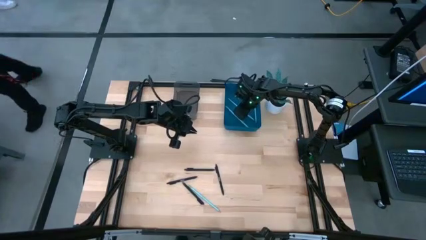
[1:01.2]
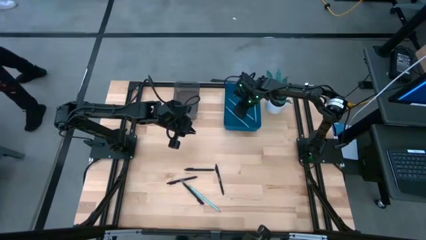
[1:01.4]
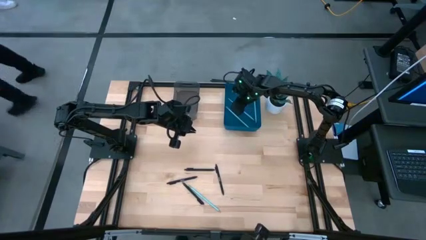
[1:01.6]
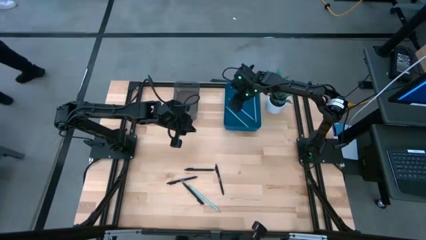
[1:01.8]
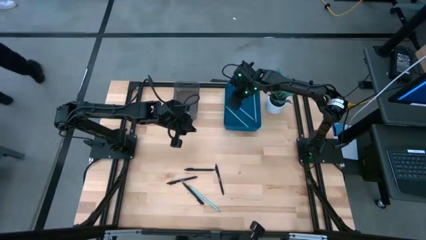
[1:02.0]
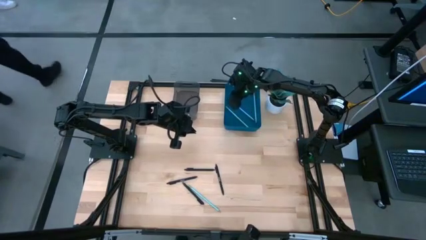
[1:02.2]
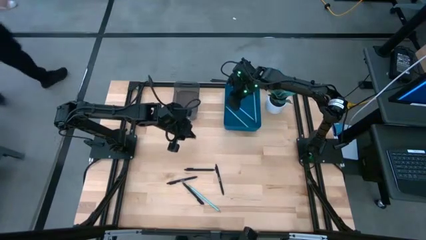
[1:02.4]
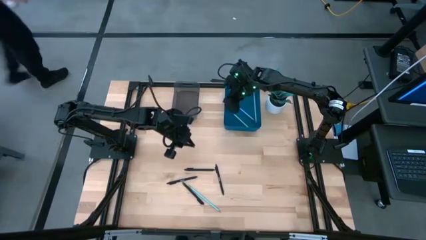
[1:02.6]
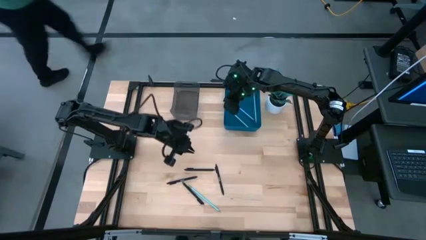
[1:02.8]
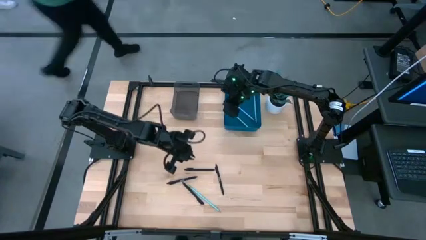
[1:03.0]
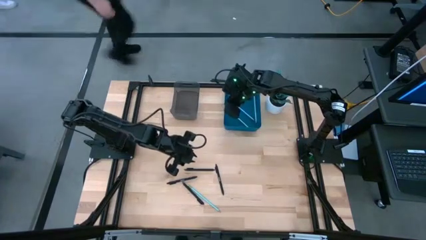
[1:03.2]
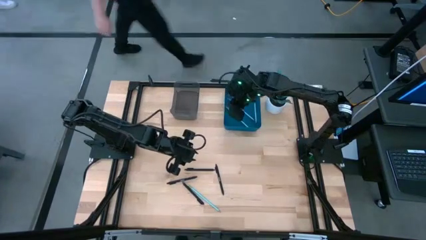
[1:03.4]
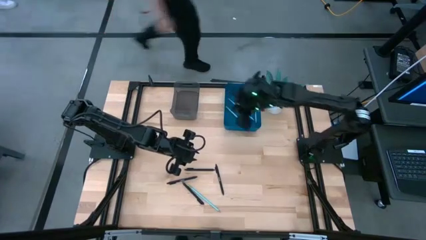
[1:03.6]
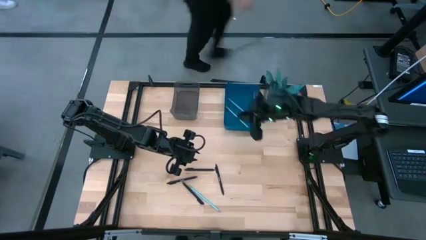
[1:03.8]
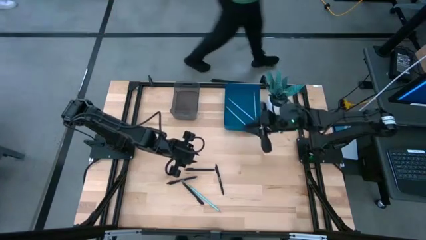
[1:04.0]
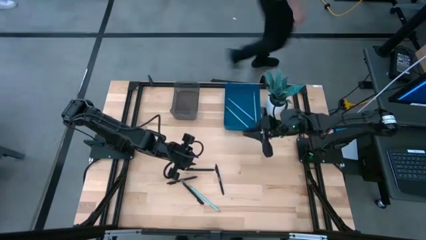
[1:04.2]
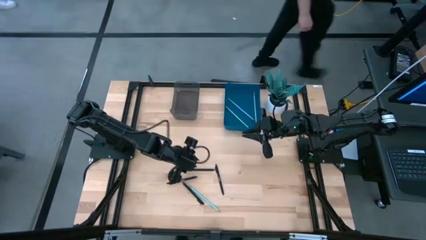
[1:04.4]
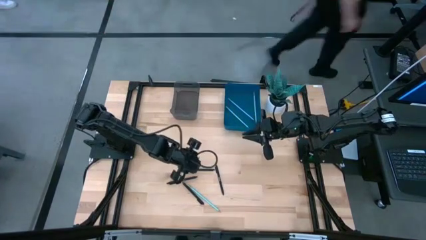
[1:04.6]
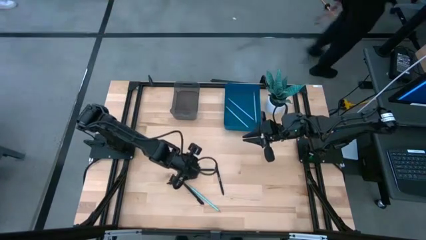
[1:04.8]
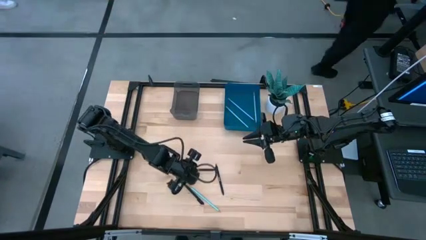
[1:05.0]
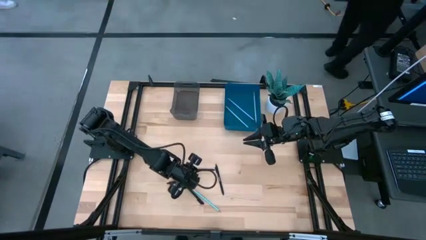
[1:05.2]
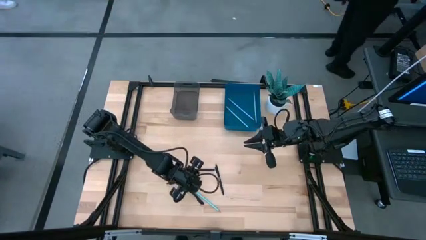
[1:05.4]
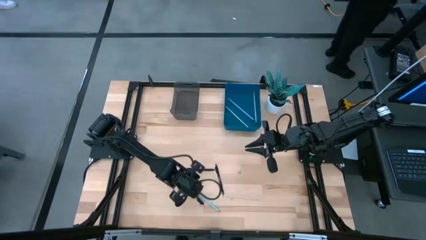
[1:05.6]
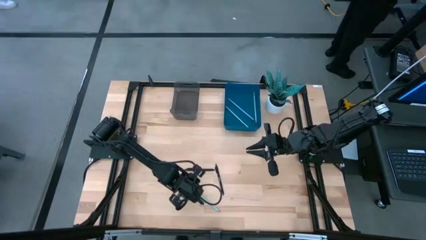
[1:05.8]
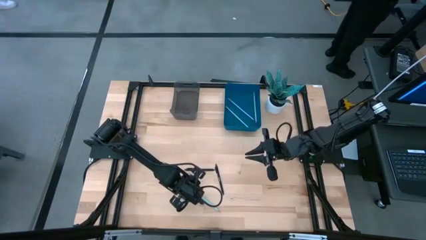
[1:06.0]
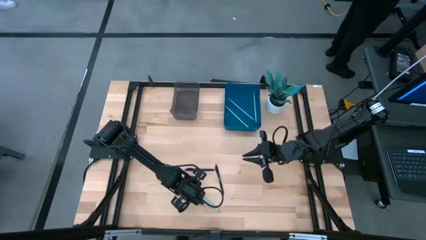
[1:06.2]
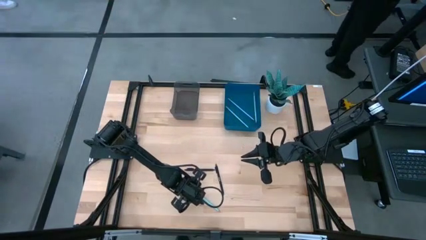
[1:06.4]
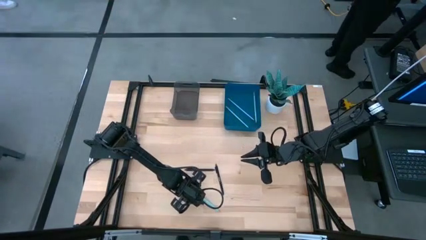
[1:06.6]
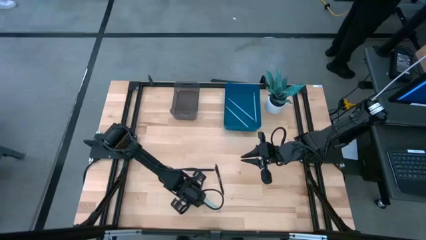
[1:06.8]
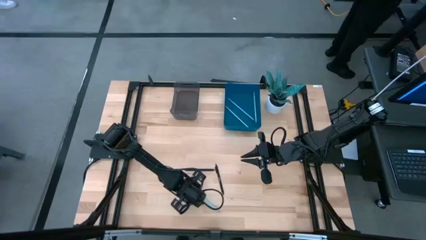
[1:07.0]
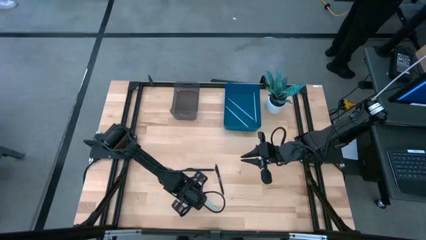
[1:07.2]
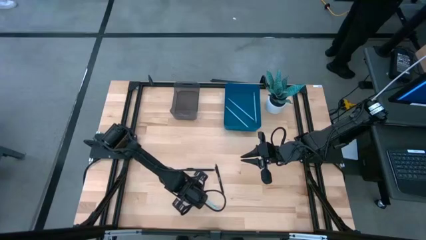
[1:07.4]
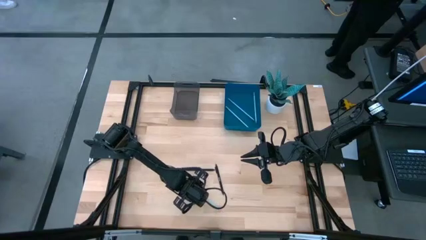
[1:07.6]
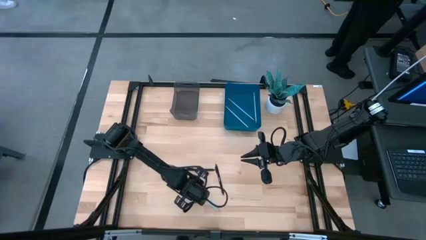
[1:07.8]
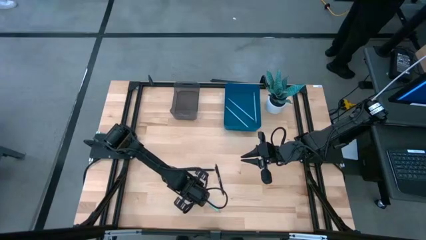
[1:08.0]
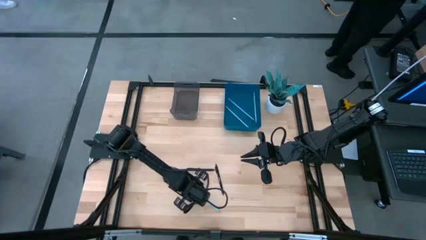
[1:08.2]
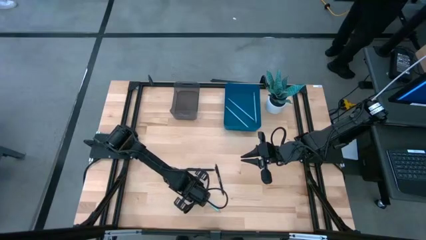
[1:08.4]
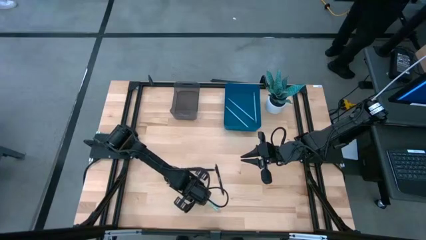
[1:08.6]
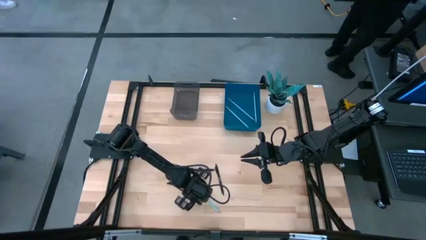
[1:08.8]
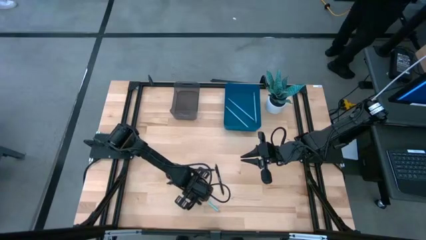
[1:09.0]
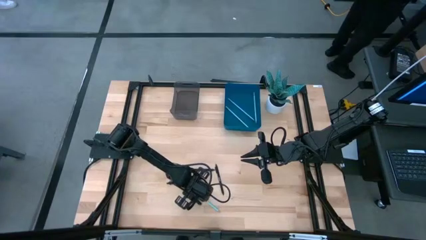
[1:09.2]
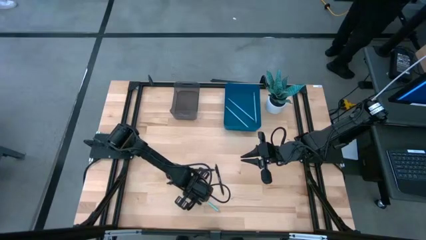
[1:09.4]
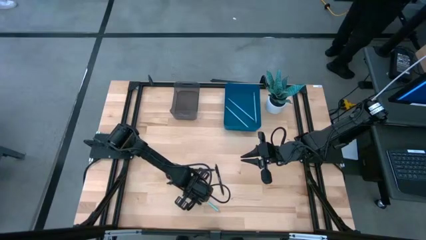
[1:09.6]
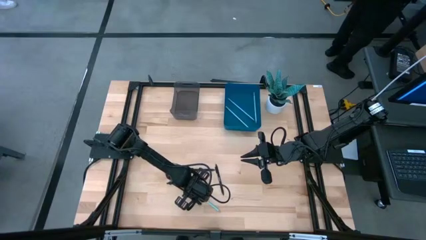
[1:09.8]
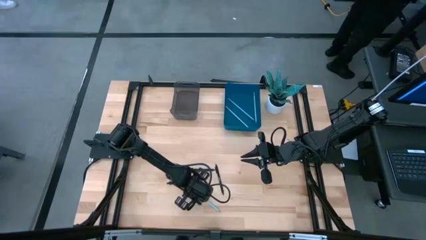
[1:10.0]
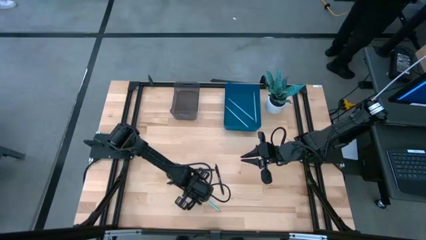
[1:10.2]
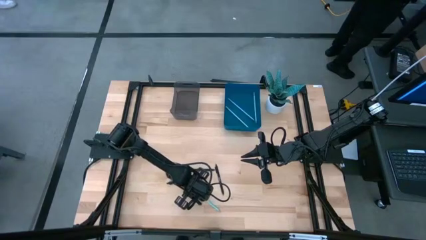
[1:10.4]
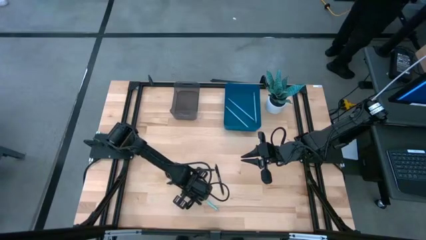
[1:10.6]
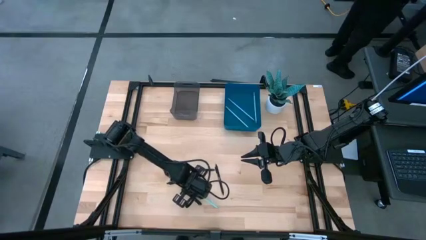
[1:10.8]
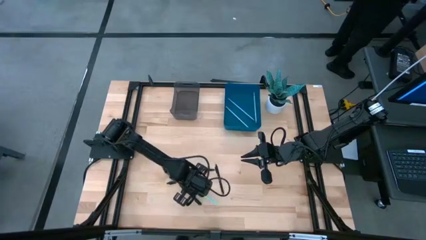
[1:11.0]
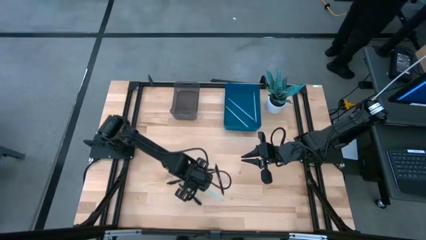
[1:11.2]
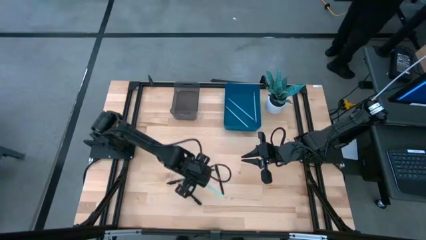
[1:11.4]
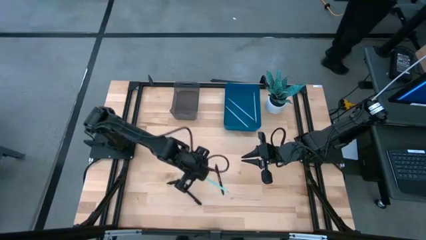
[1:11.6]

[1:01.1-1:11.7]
Task: Sort pens & pencils
Put the light blue pencil into the blue bin

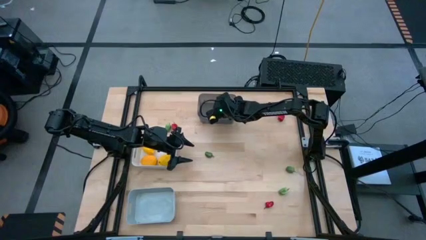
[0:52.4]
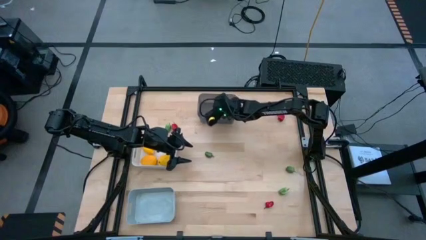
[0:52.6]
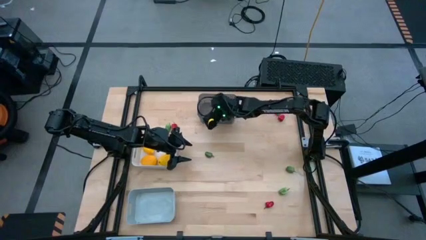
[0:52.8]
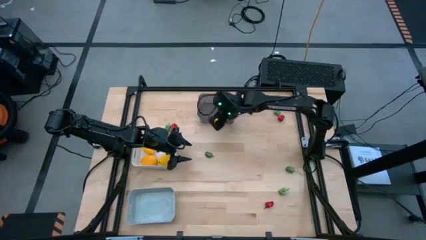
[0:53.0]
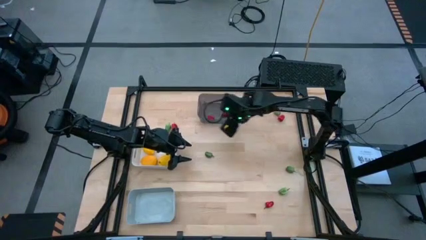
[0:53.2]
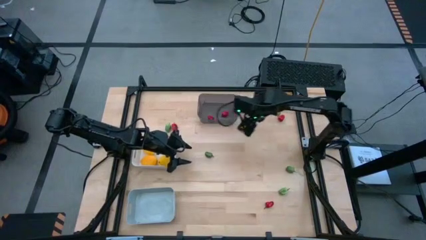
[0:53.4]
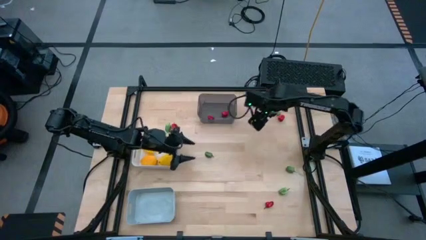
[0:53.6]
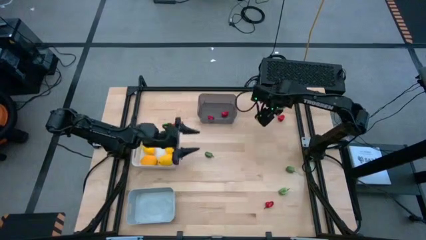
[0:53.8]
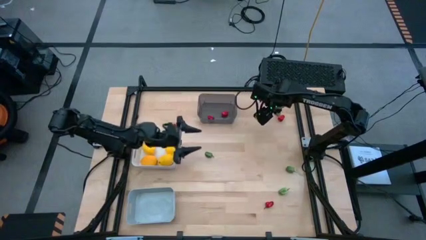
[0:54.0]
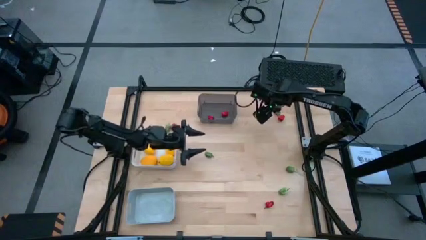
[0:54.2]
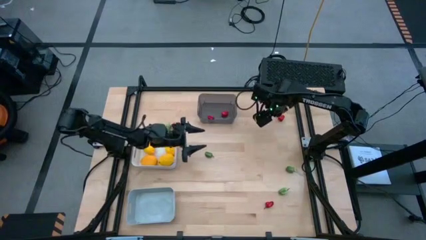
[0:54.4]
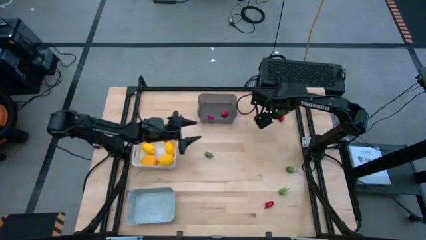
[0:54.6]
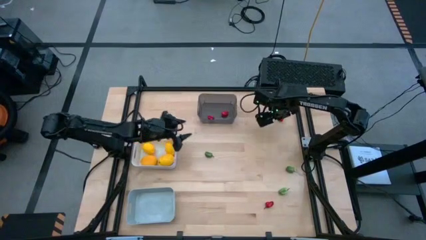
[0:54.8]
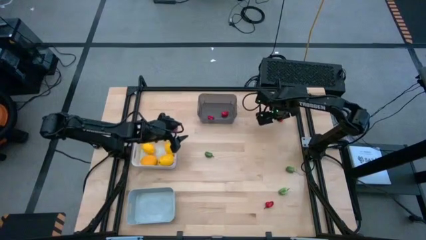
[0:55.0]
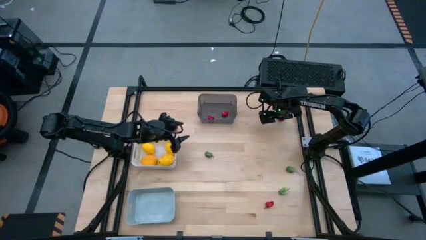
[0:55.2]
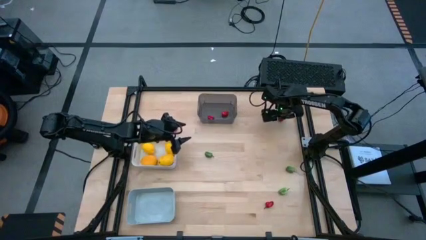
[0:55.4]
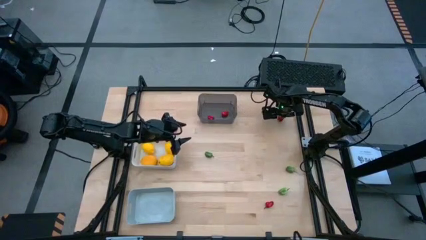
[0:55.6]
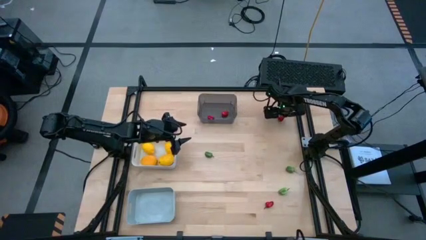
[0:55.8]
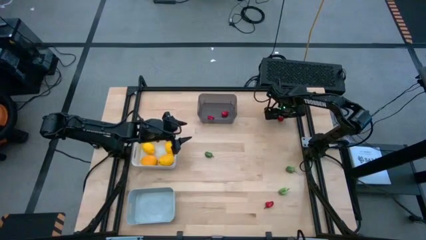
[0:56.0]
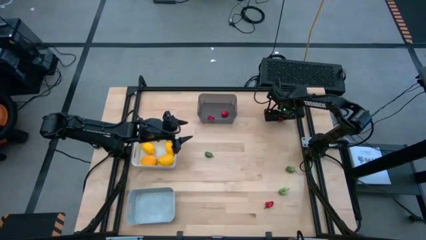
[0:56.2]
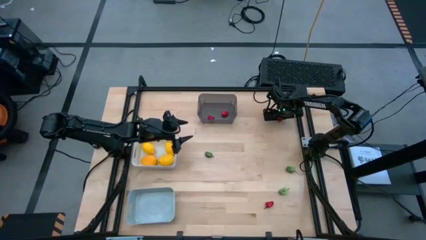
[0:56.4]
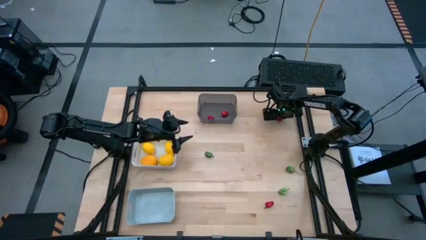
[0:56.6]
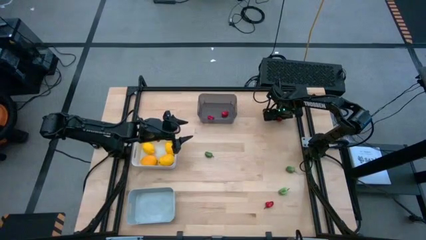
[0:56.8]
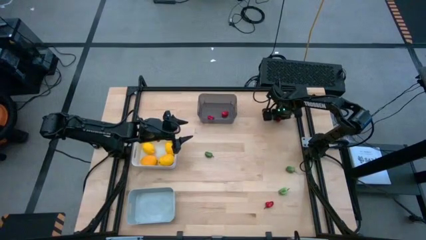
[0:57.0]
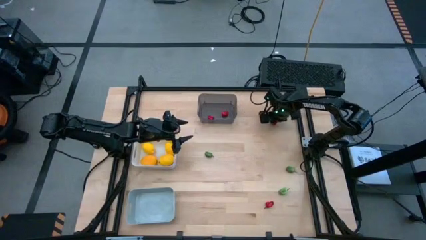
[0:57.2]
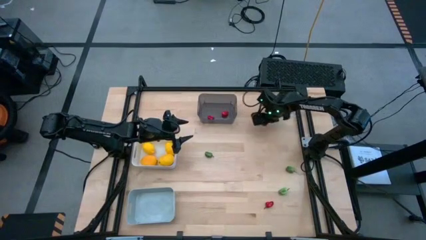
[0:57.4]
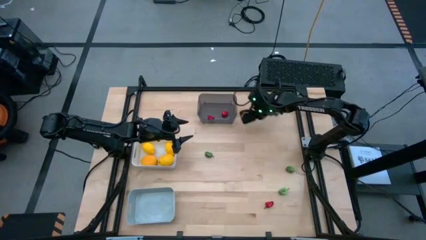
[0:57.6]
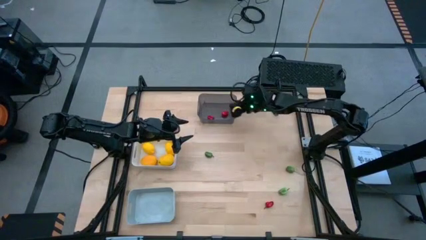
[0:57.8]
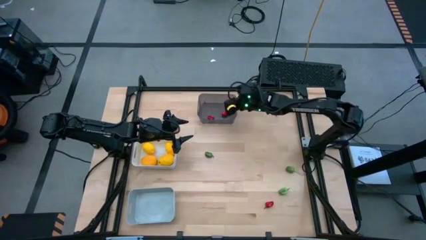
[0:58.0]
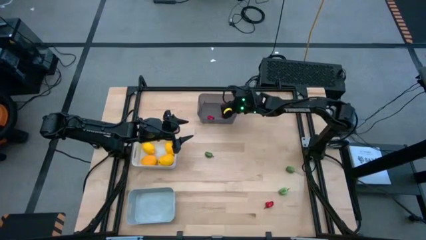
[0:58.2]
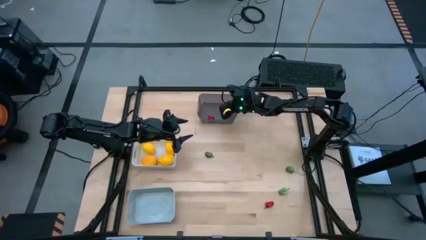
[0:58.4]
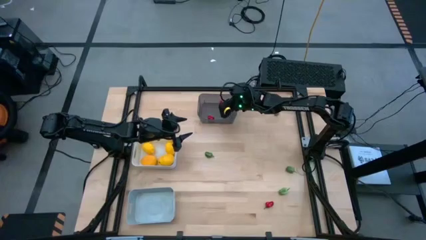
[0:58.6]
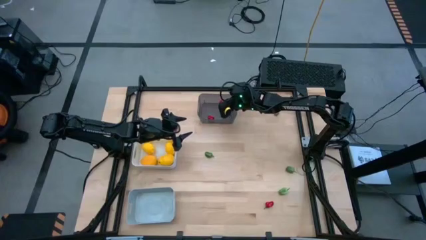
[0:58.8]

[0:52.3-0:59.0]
Task: Sort produce into baskets
Put the red chili pepper into the black transparent bin

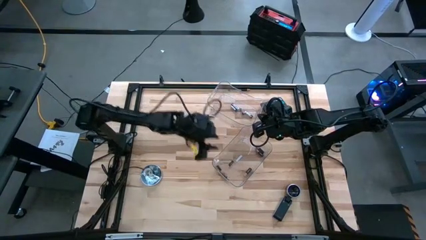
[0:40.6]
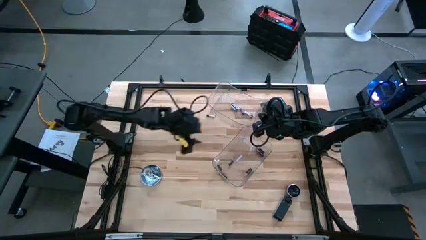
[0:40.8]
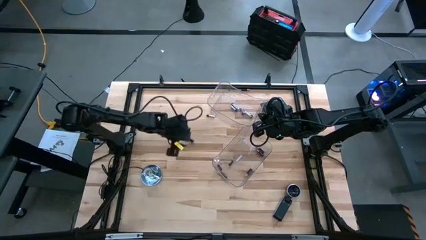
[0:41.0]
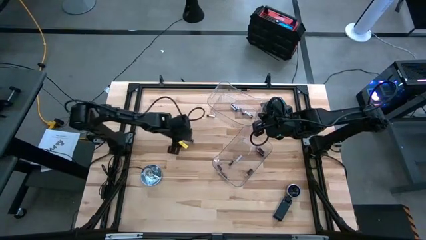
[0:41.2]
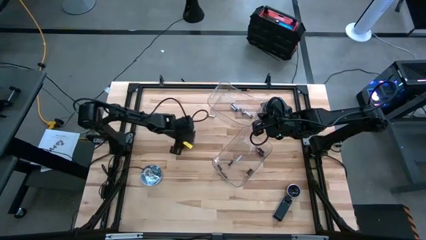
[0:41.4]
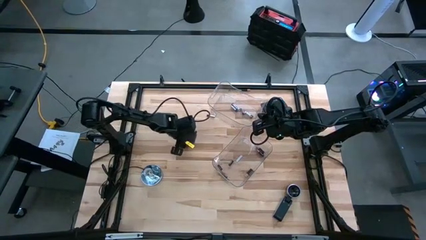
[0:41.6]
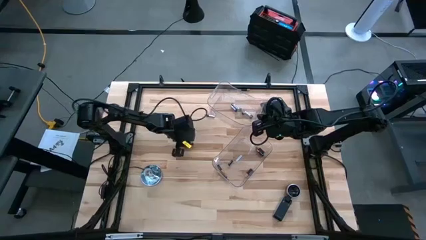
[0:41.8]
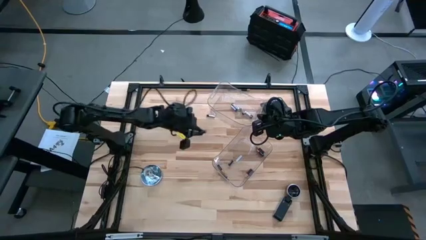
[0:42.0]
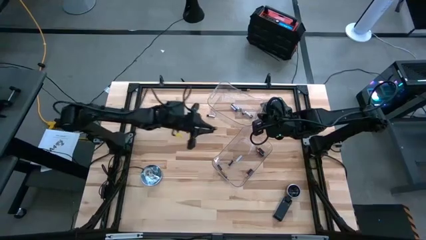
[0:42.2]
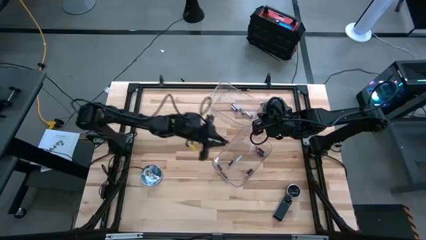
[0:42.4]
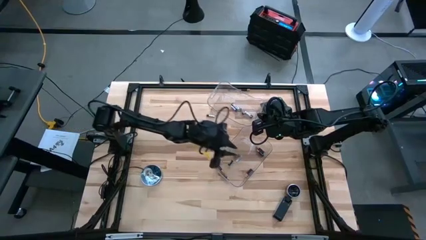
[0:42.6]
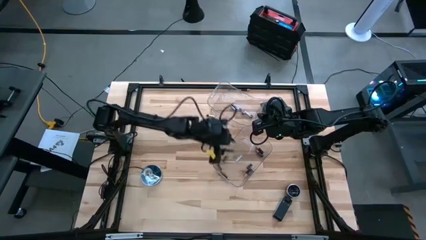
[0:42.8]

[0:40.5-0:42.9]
Task: Sort batteries
Put the black battery into the bottom transparent bin
